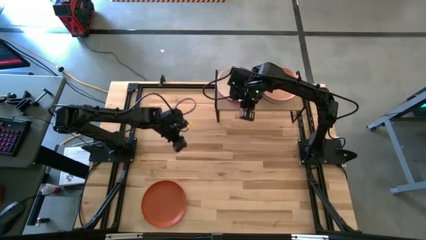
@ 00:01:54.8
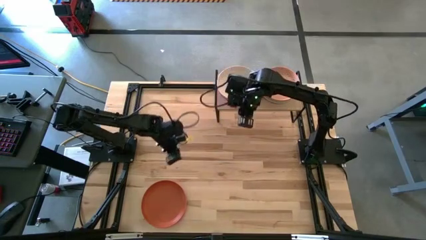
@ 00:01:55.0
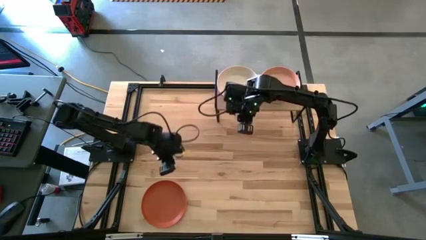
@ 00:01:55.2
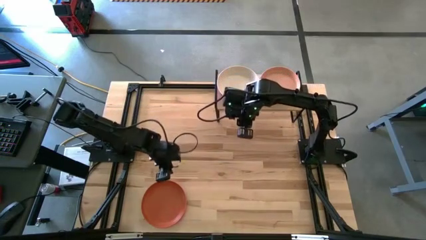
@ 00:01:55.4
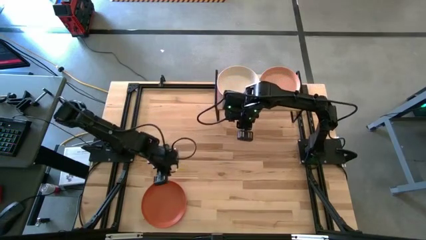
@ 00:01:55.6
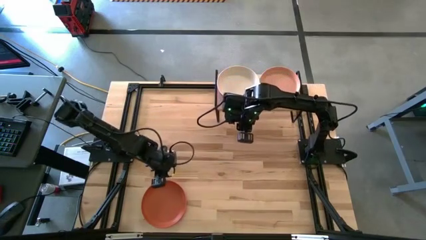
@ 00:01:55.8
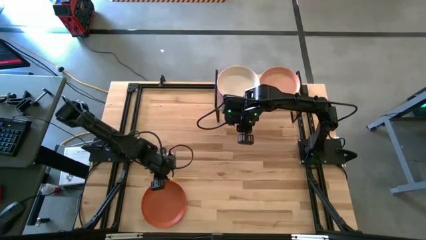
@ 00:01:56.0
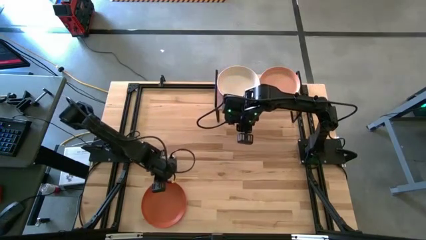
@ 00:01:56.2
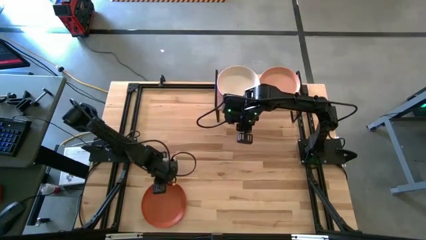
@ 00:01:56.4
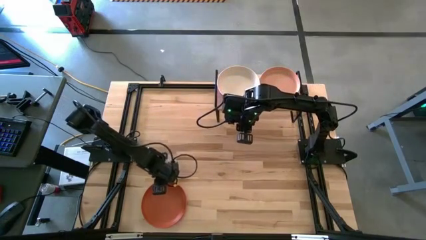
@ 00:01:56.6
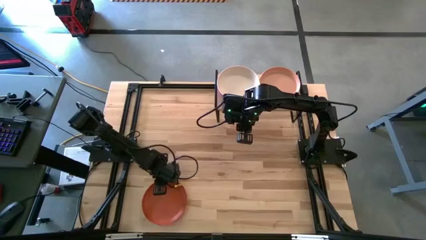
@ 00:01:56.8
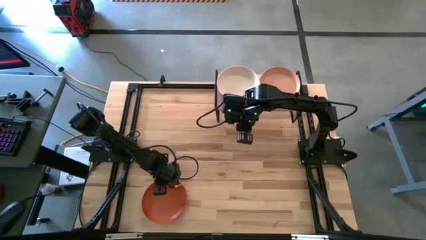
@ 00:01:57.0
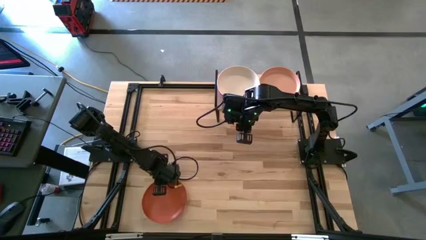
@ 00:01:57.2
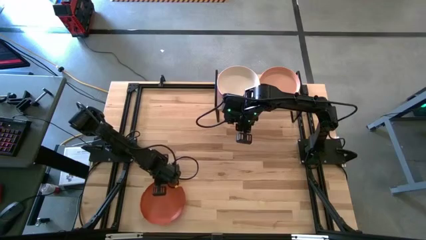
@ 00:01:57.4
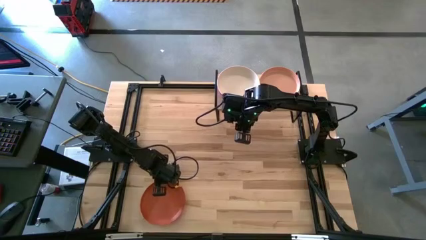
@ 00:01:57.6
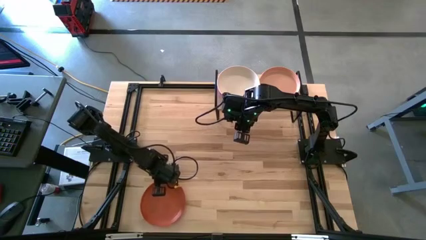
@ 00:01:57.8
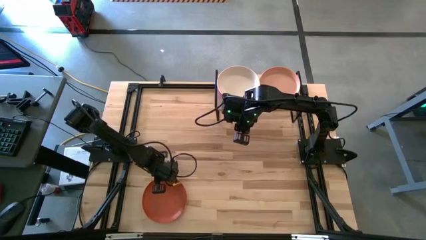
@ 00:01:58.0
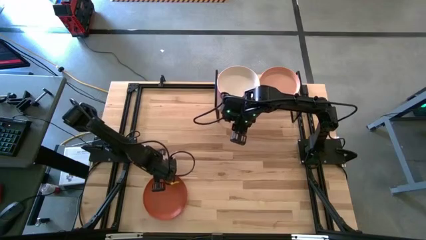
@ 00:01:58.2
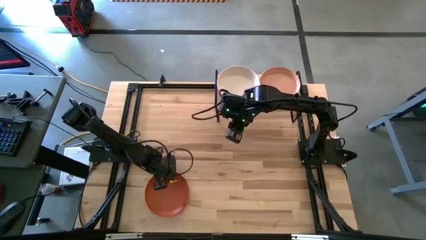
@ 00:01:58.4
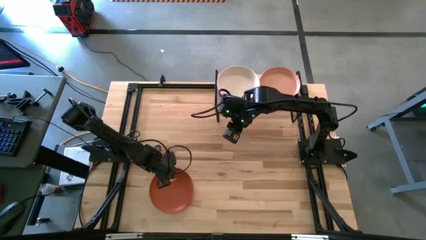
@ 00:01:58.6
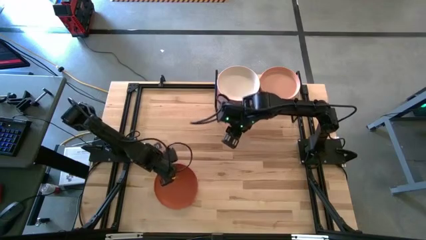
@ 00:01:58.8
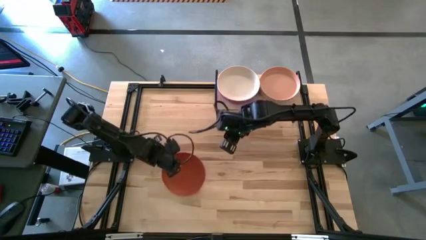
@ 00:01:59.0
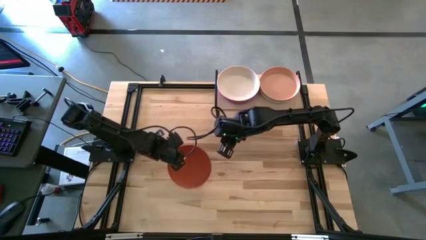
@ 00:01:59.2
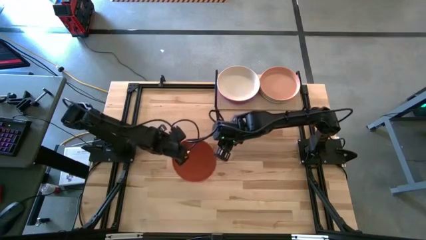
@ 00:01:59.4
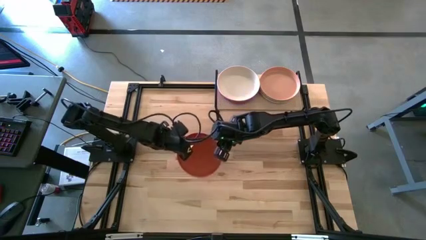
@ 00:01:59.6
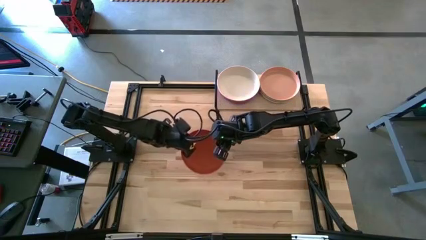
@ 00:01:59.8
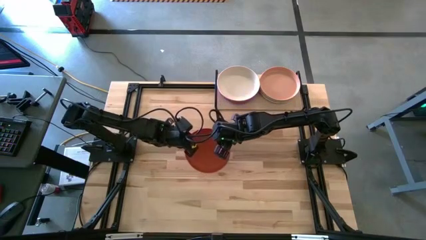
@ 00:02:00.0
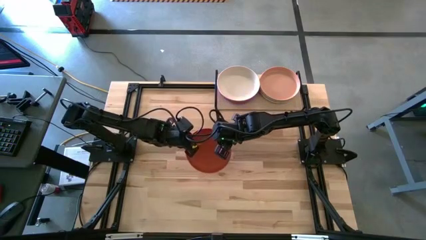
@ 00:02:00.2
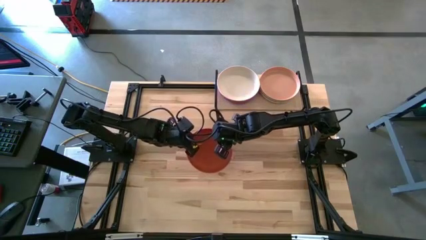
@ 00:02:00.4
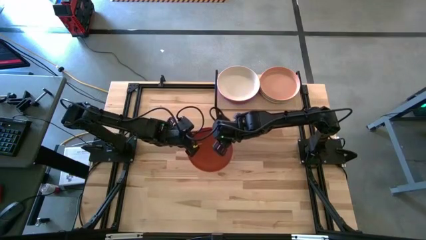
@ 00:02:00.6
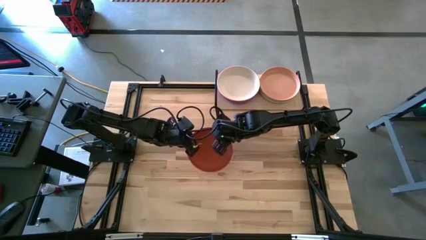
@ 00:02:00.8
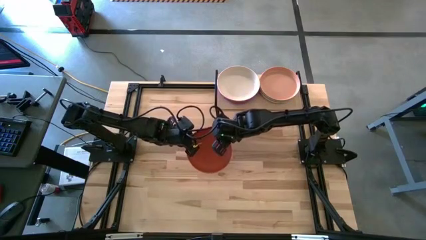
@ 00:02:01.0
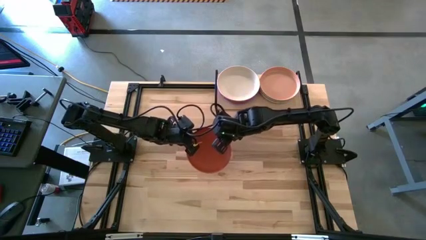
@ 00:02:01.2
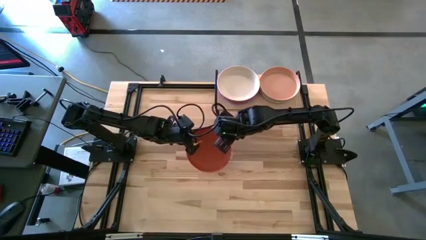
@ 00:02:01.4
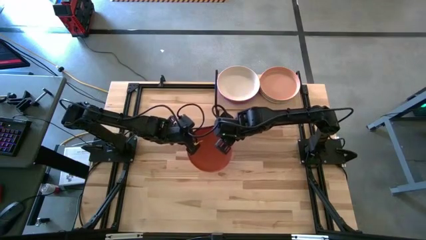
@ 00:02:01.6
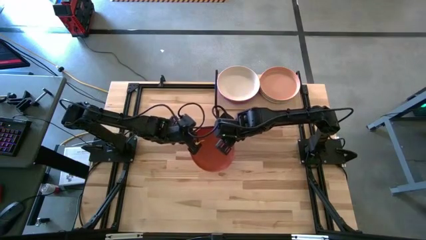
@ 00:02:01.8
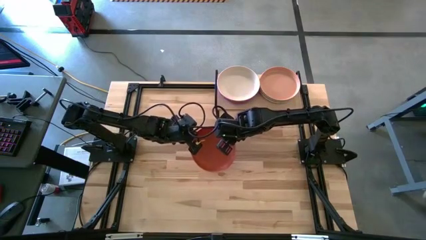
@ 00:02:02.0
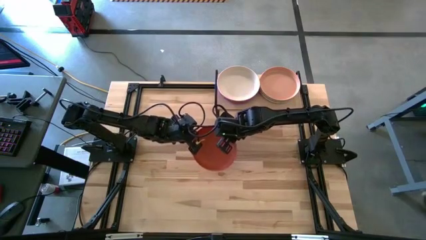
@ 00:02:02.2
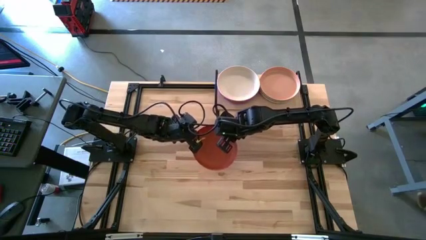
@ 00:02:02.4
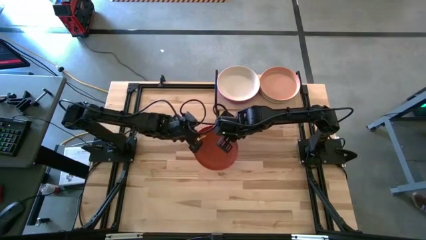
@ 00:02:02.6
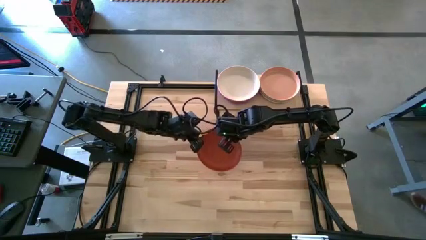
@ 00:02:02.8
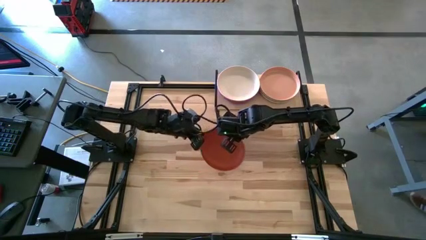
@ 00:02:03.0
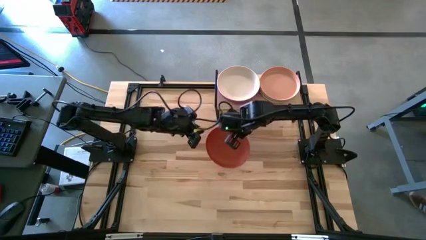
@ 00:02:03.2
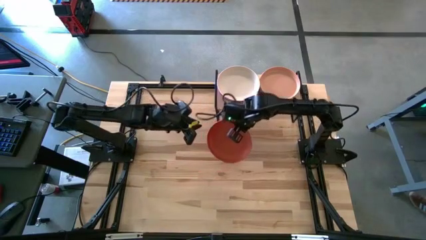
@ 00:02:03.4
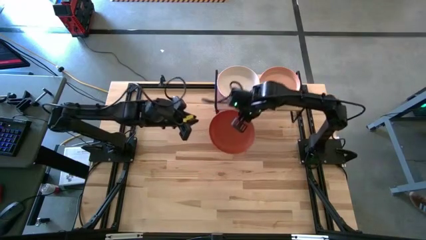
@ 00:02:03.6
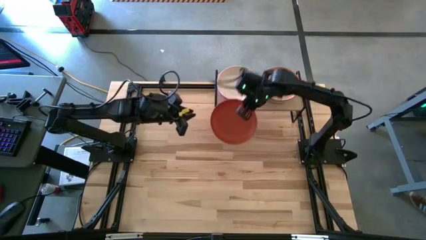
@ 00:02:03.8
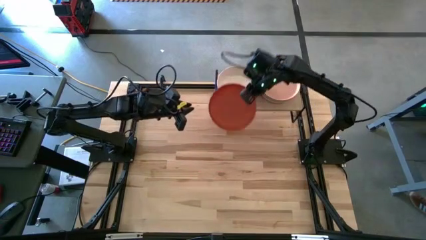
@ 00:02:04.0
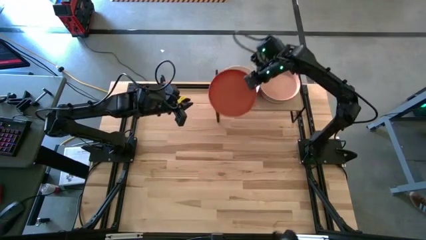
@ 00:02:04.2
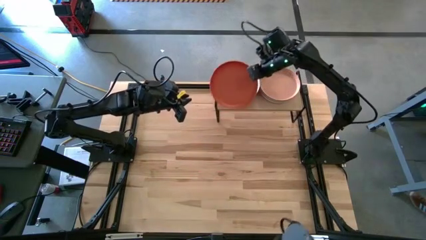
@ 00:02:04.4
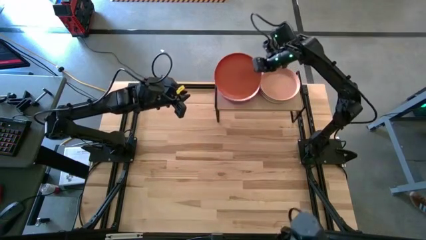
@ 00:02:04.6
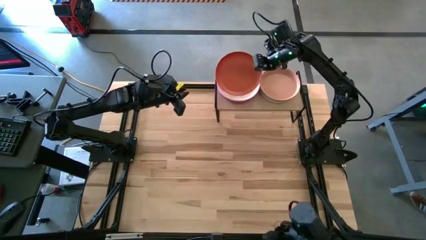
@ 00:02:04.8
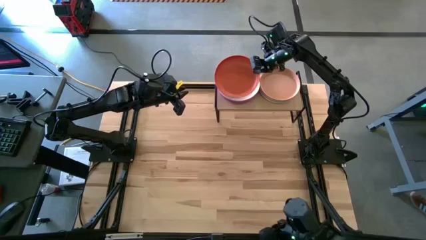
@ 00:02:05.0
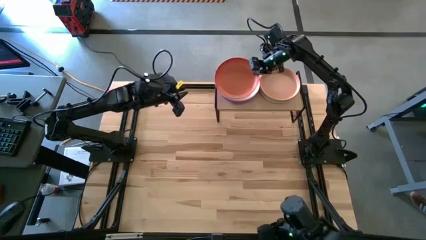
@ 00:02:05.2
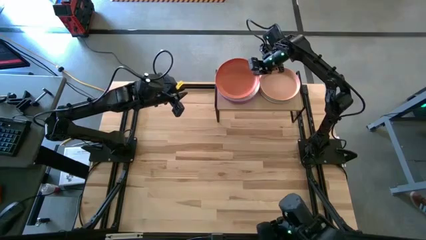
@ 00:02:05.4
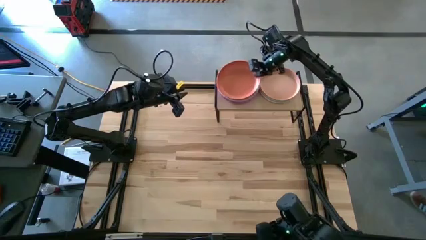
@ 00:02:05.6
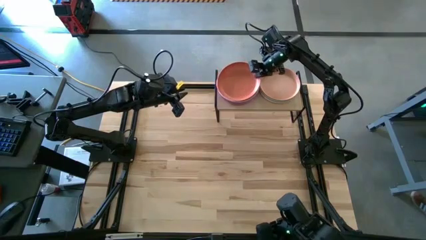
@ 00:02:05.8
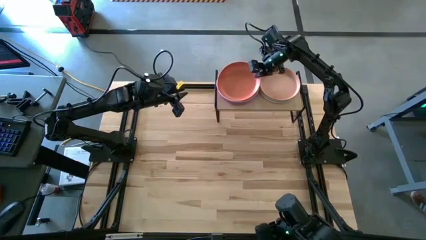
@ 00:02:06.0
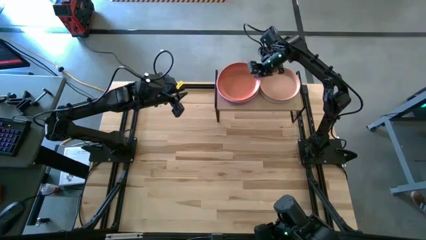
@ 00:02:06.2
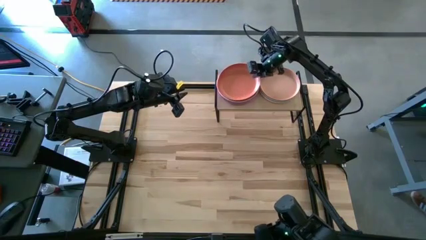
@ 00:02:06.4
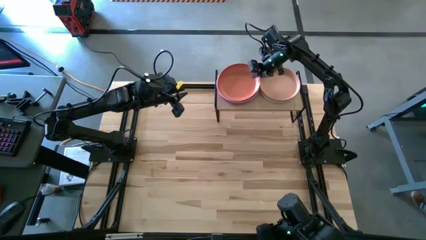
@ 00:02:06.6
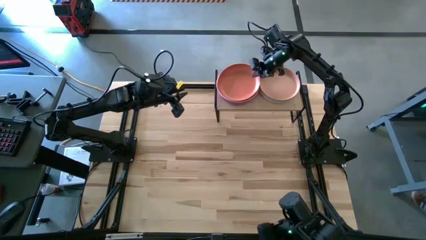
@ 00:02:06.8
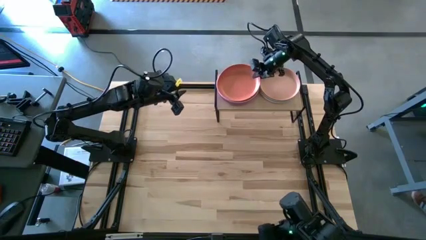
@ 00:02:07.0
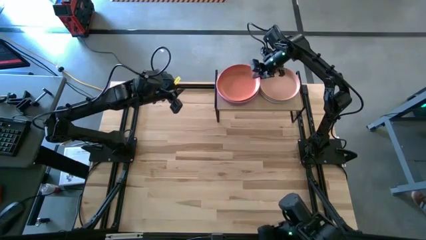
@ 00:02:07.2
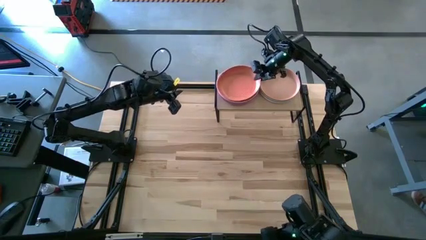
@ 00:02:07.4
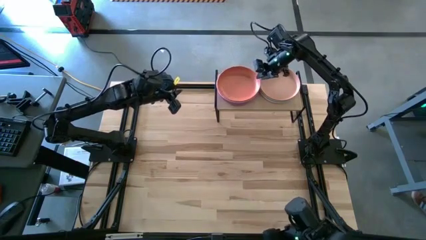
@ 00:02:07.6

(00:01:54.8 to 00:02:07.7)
Task: Place and stack plates onto a shelf
Stack the orange plate on top of the white plate

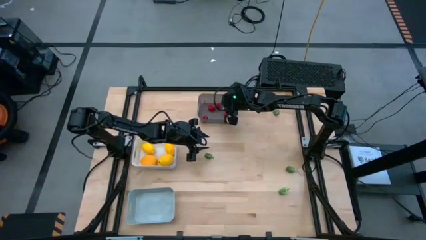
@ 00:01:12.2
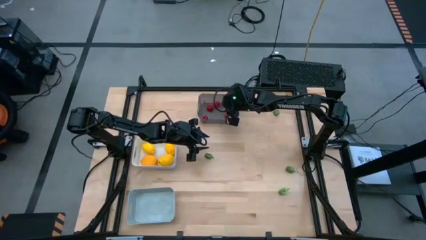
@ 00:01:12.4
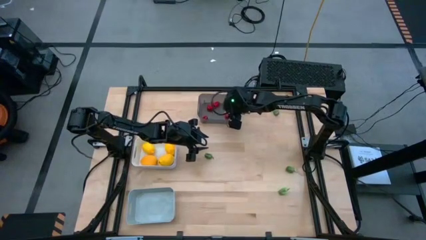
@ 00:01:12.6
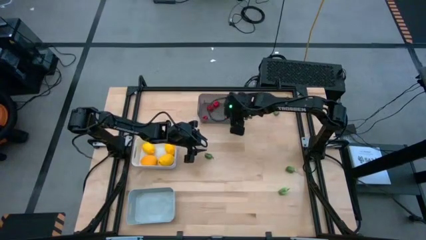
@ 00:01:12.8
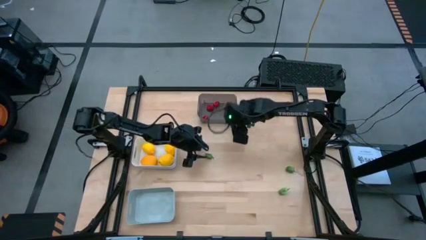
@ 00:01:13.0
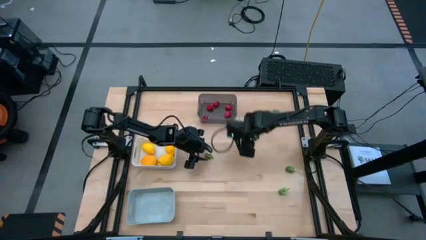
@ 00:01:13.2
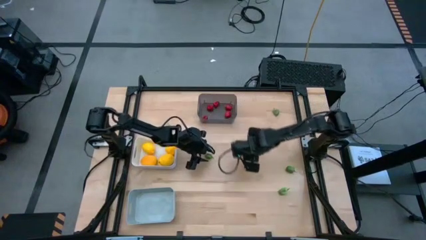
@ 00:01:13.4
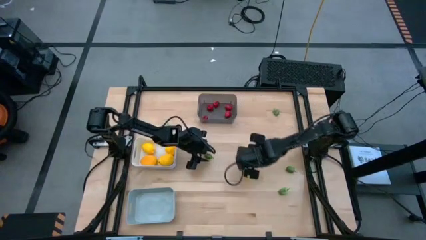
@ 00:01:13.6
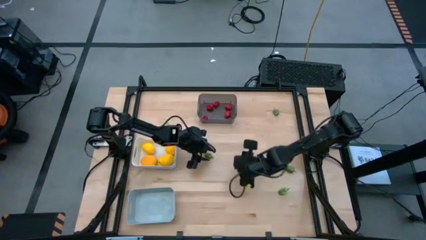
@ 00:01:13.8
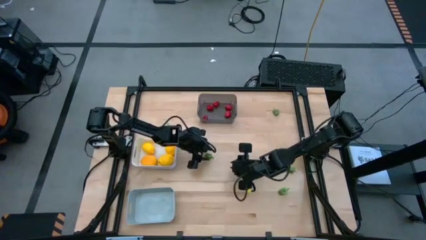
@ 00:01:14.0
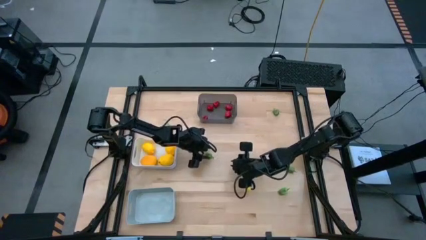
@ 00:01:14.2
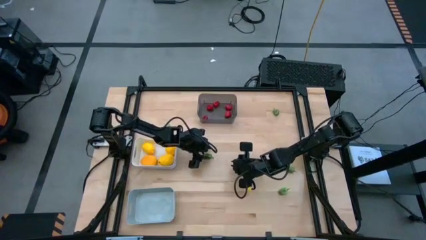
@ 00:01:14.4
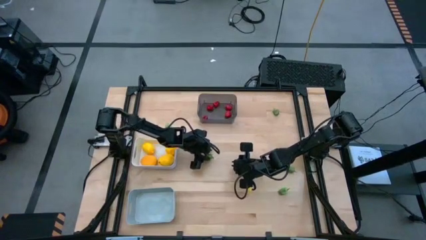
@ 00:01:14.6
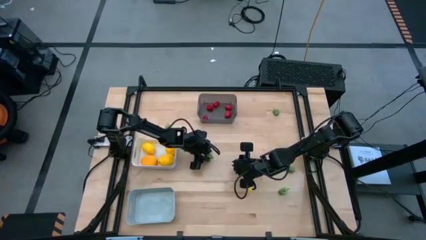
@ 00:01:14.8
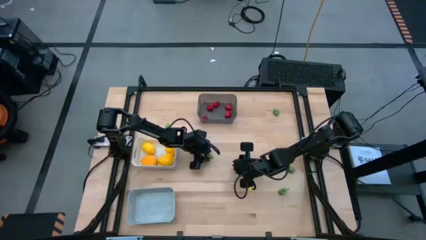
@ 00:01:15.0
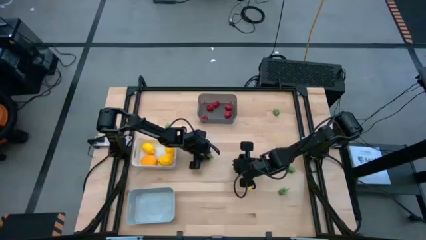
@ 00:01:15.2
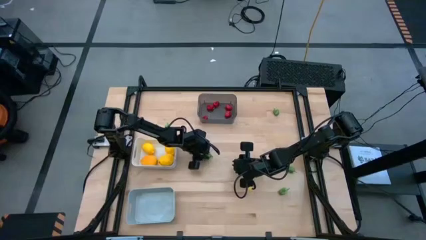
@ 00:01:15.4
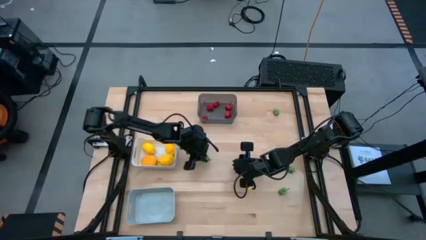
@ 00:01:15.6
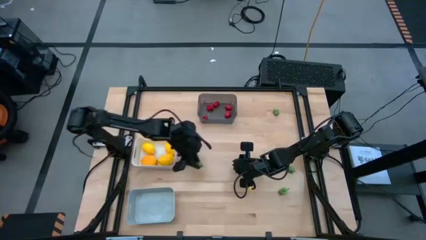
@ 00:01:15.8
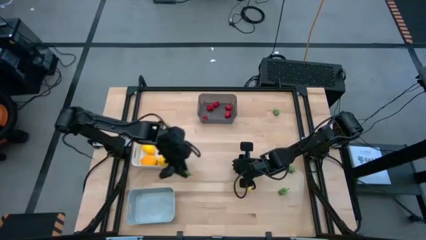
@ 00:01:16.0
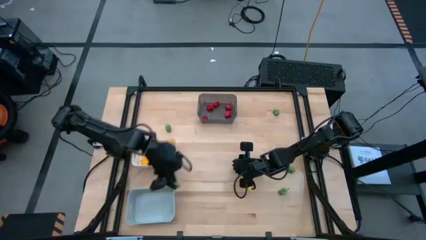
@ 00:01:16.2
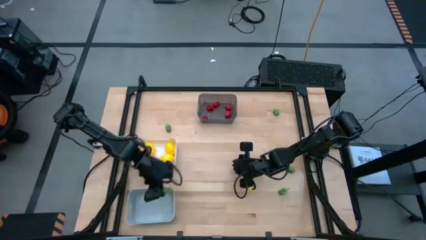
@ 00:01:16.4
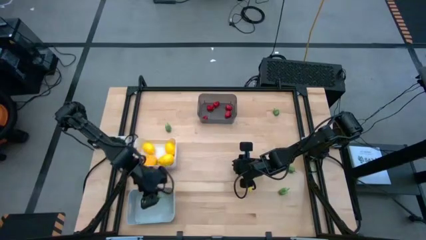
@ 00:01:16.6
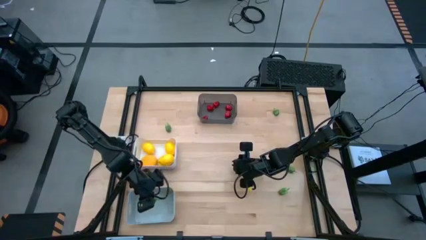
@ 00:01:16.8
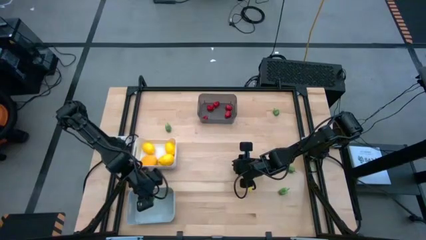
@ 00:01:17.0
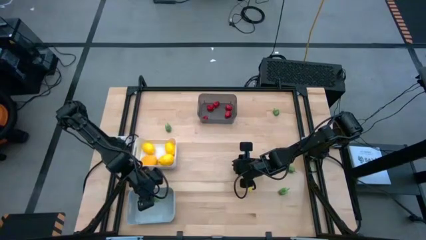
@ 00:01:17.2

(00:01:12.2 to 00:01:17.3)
Task: Sort produce into baskets
Put the green chili pepper into the gray bin
